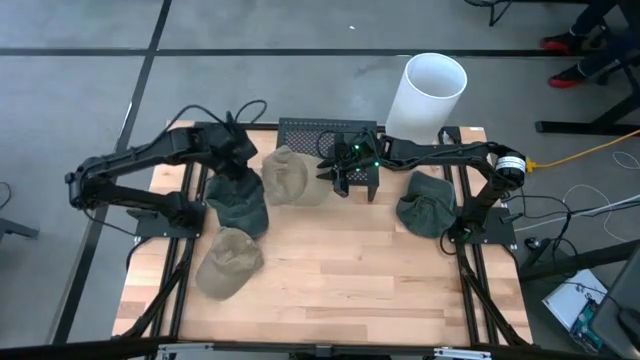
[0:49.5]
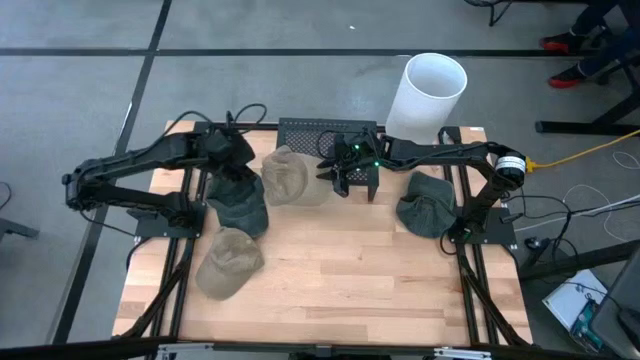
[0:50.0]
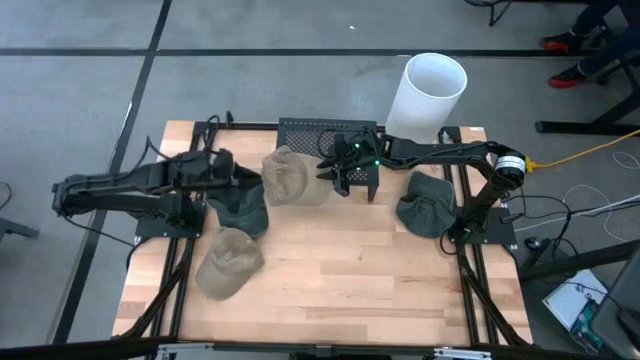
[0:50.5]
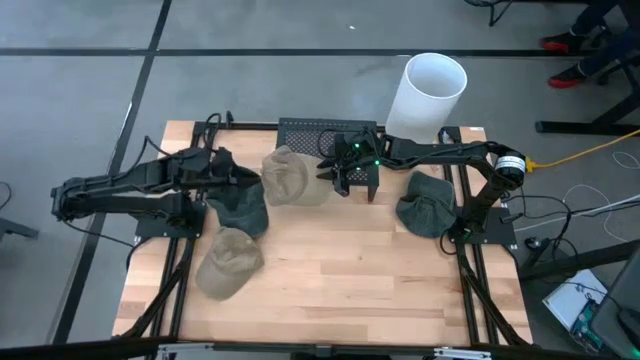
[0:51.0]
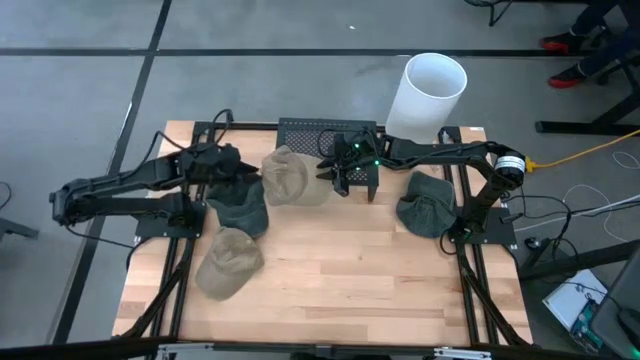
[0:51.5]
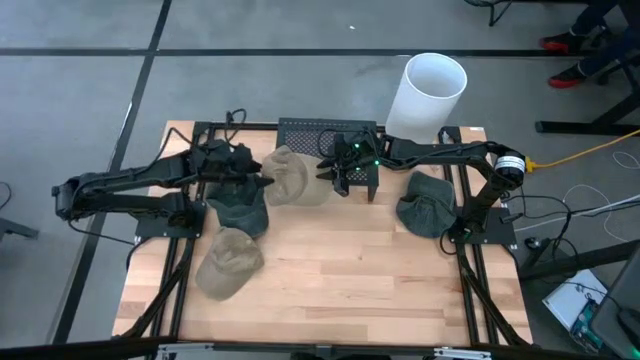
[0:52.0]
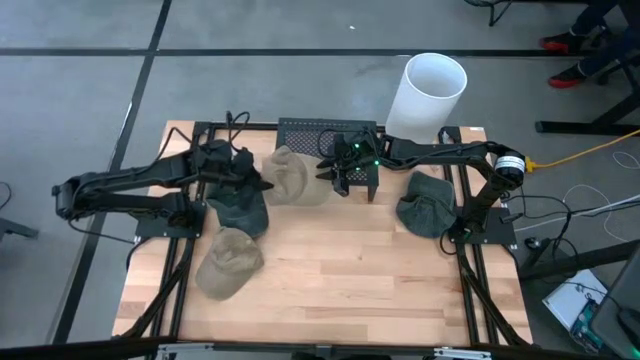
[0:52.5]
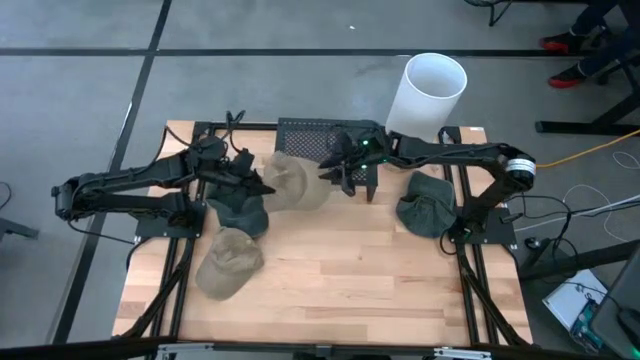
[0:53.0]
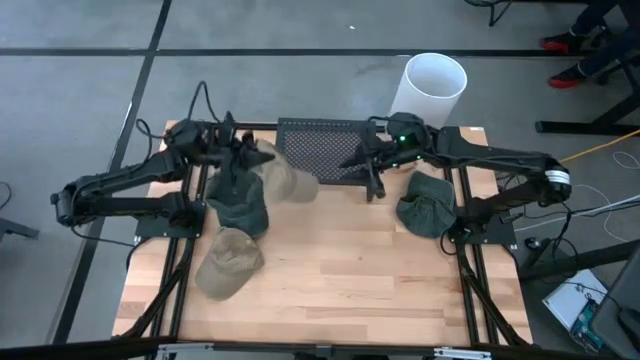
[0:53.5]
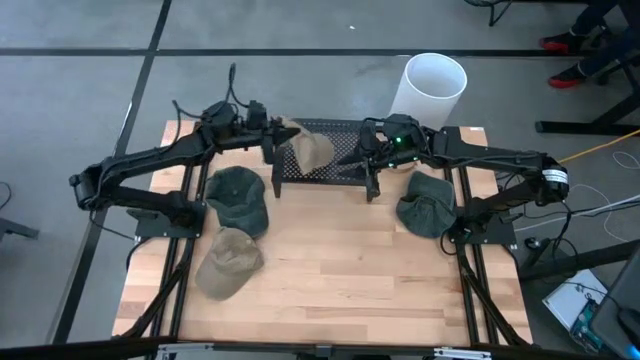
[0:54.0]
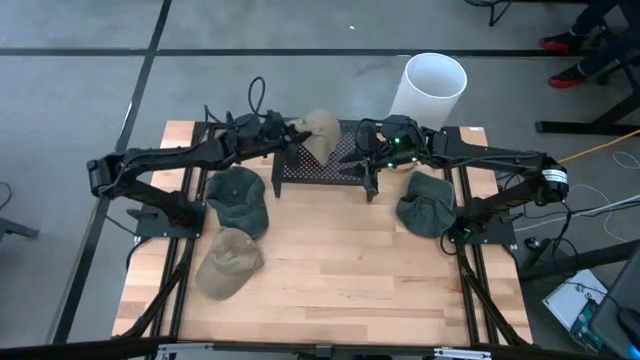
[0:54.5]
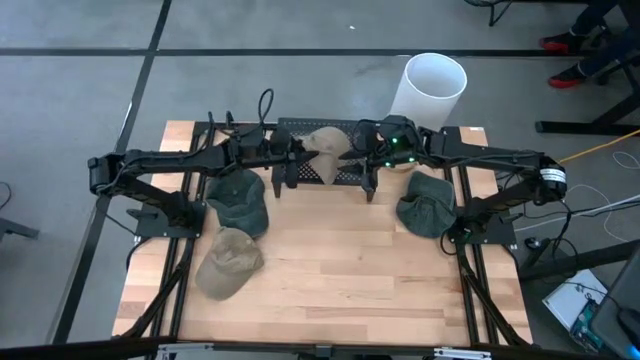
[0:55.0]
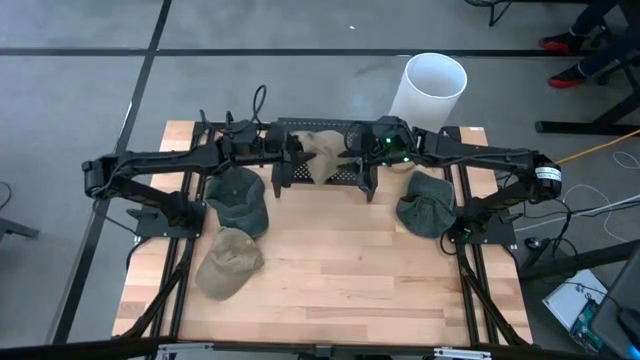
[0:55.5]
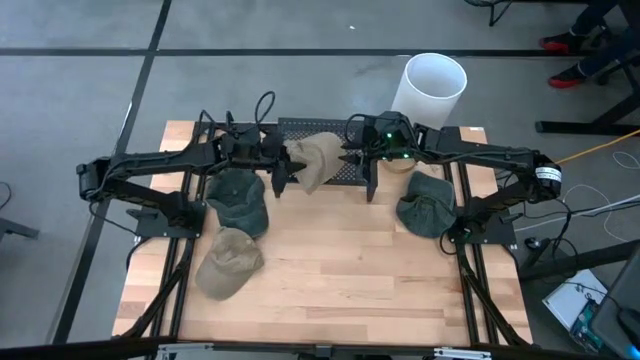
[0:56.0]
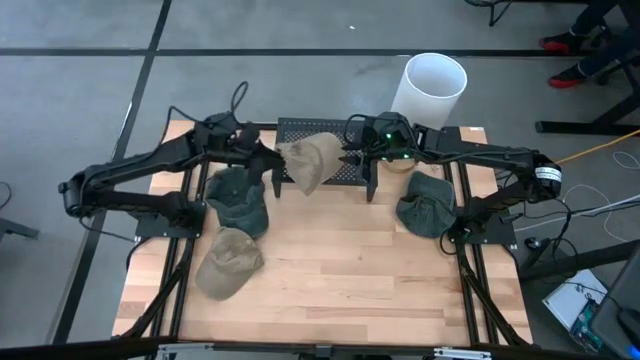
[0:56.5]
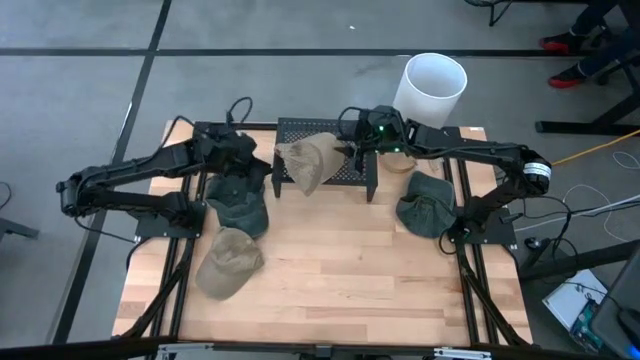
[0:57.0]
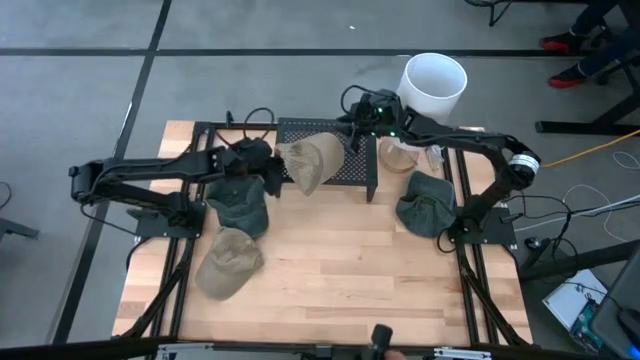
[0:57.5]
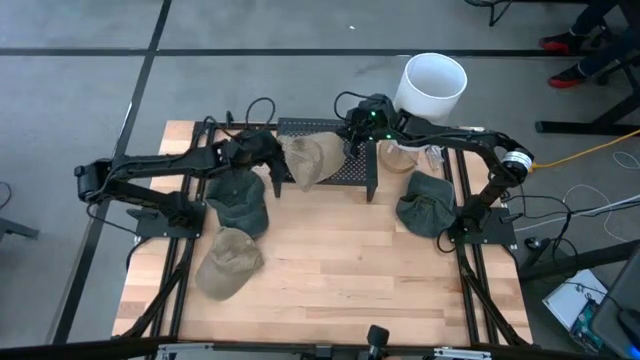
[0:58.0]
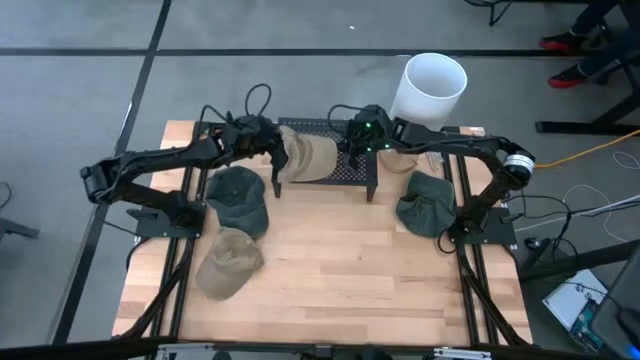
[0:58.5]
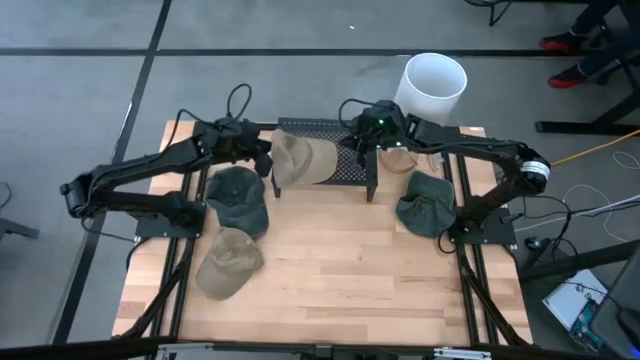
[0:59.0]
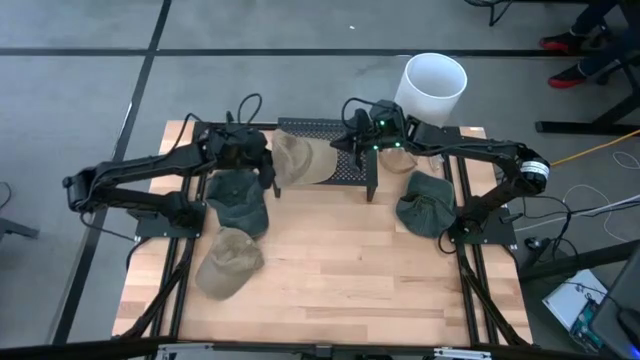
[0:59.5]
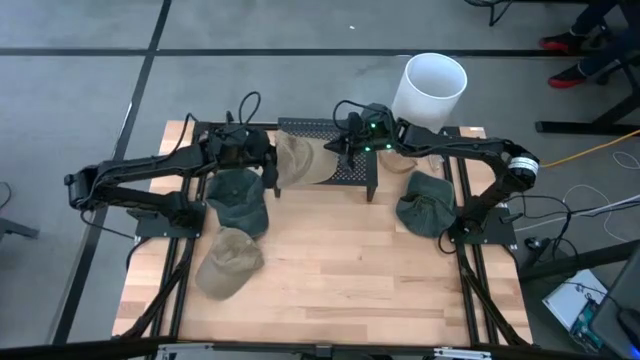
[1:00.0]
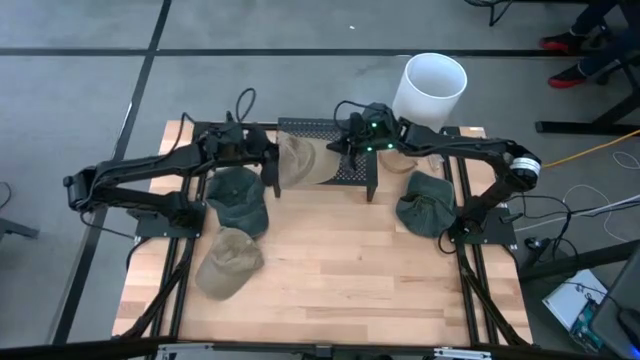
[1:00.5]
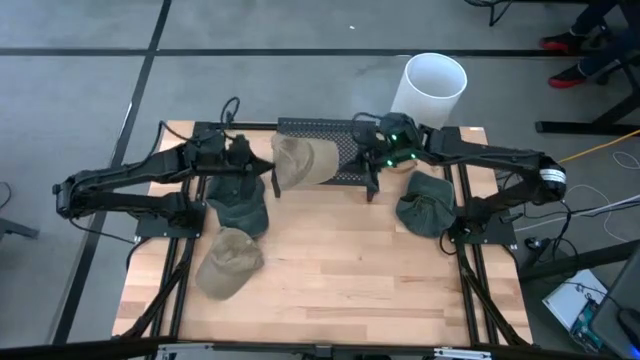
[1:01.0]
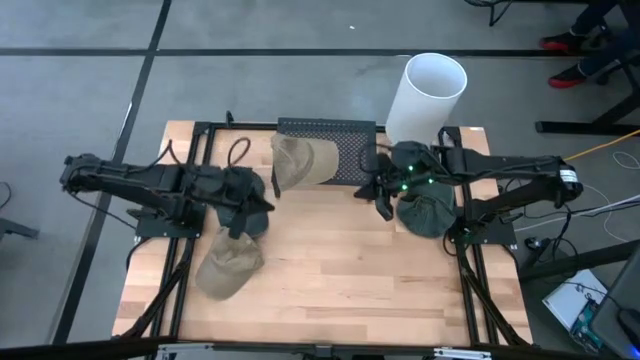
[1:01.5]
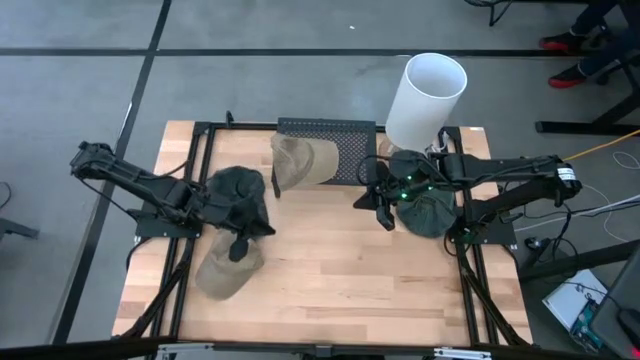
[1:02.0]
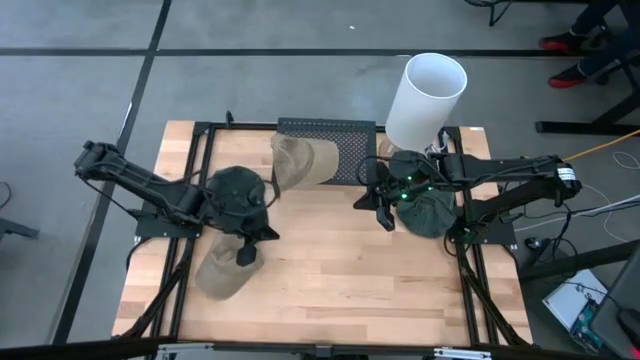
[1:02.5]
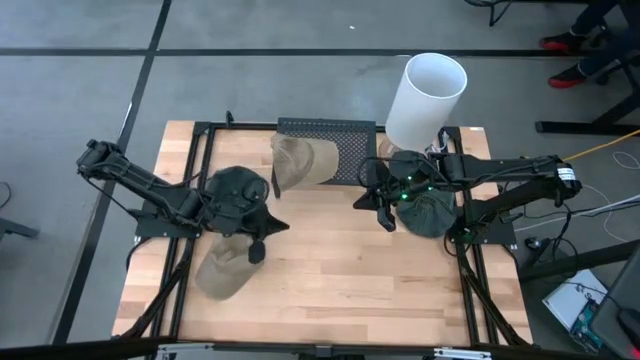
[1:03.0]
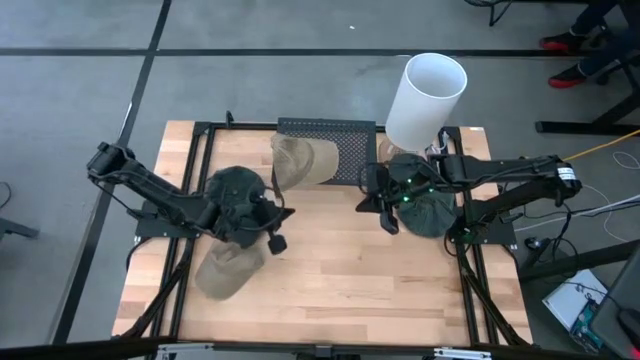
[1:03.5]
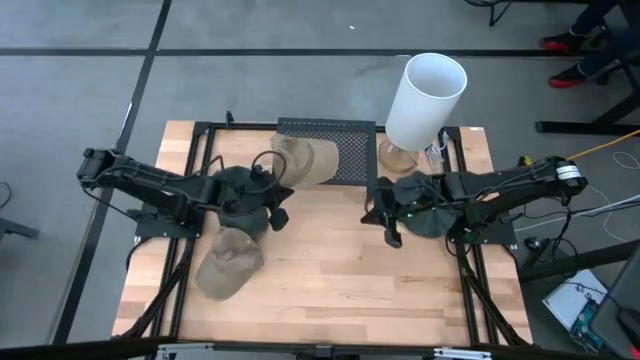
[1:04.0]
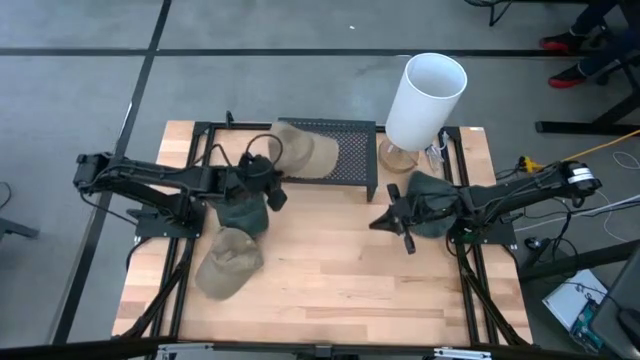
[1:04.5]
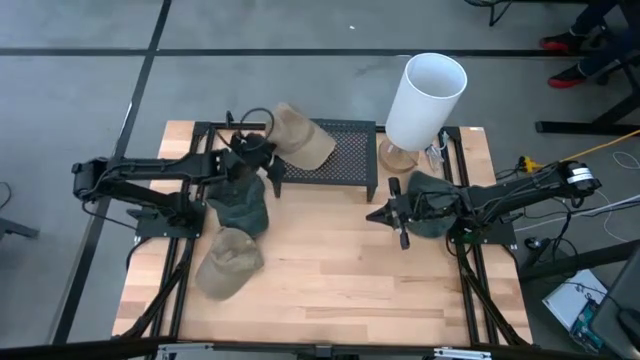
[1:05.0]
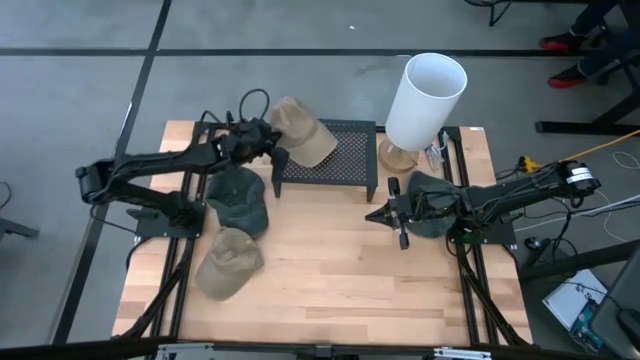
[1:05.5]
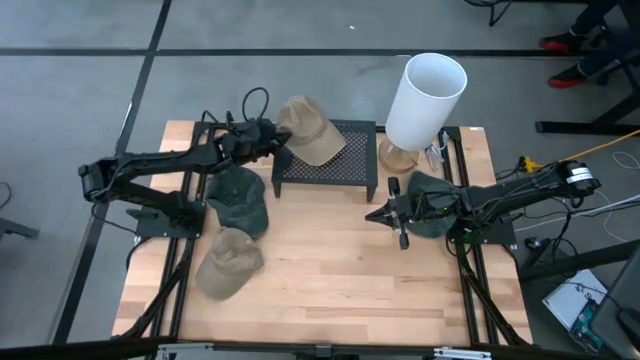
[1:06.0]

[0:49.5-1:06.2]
Task: Pick & Place hat
Put the right brown cap on the shelf

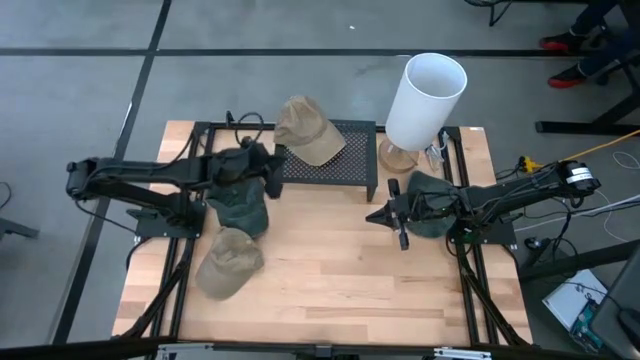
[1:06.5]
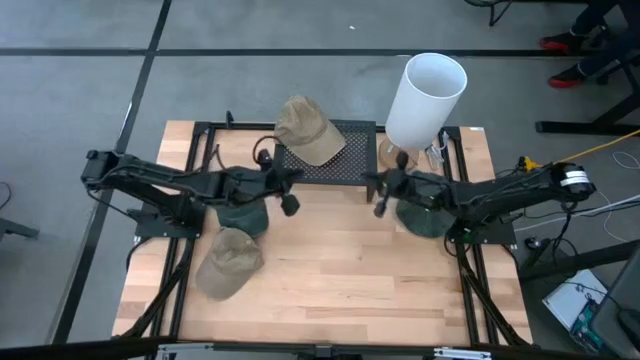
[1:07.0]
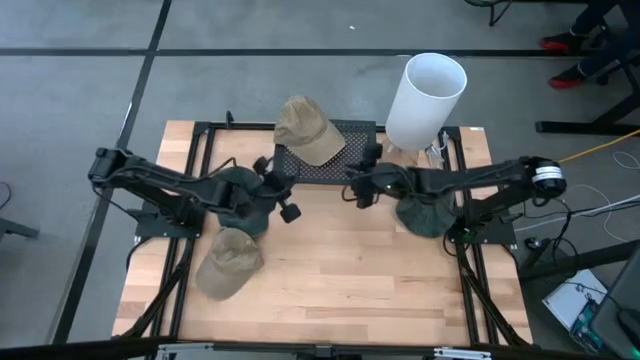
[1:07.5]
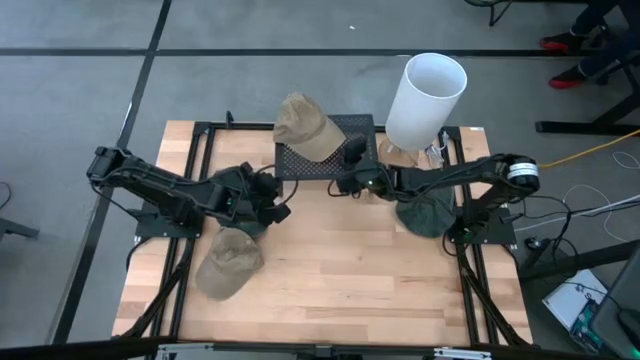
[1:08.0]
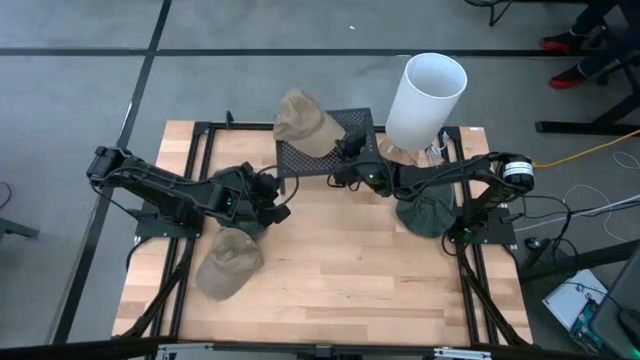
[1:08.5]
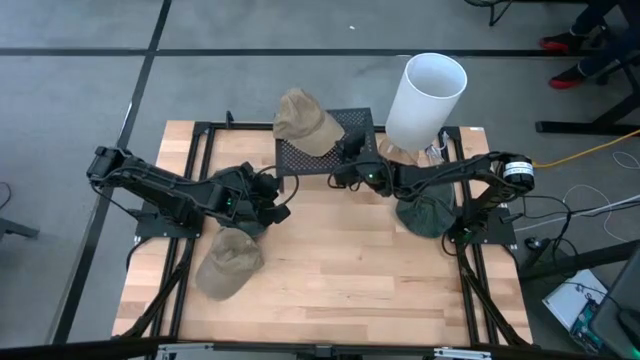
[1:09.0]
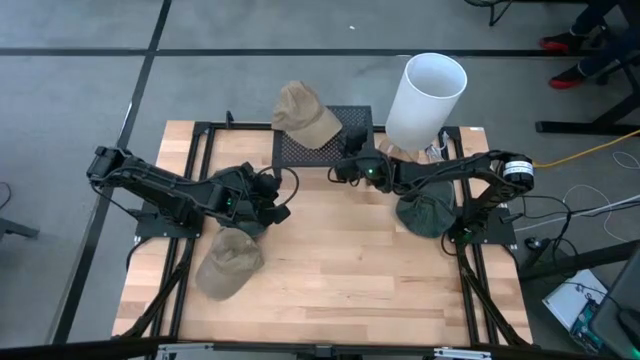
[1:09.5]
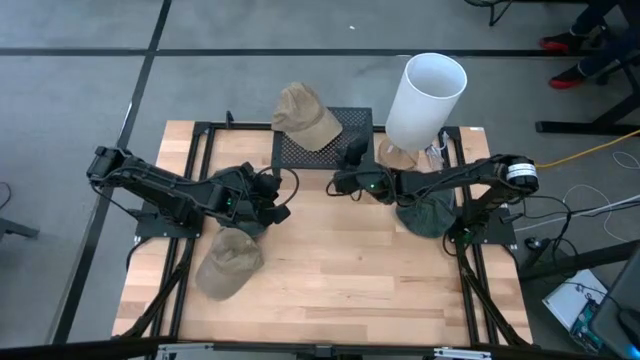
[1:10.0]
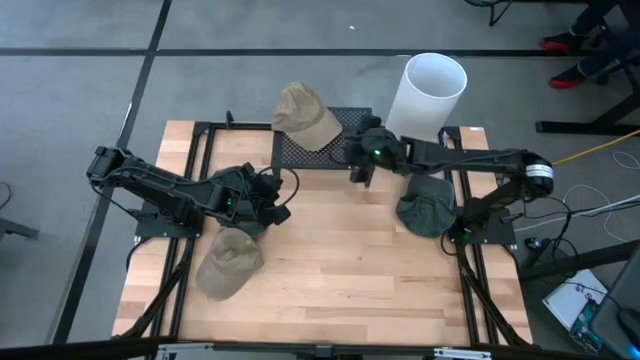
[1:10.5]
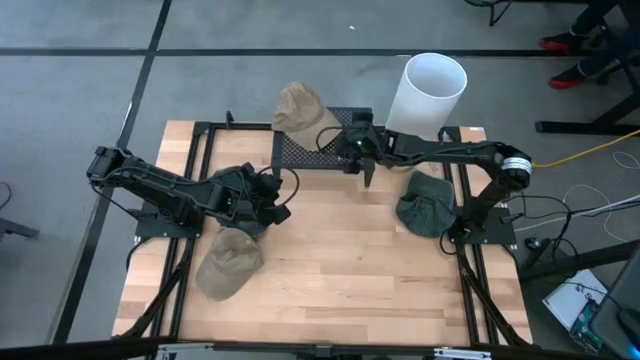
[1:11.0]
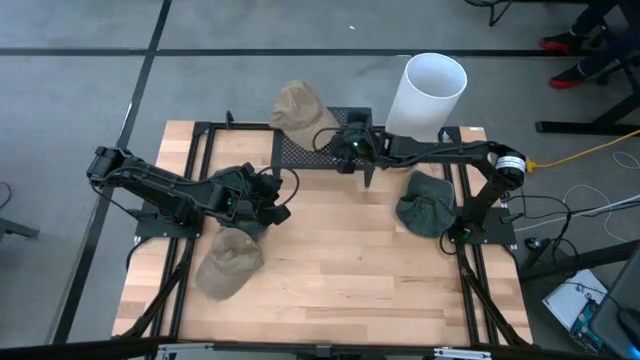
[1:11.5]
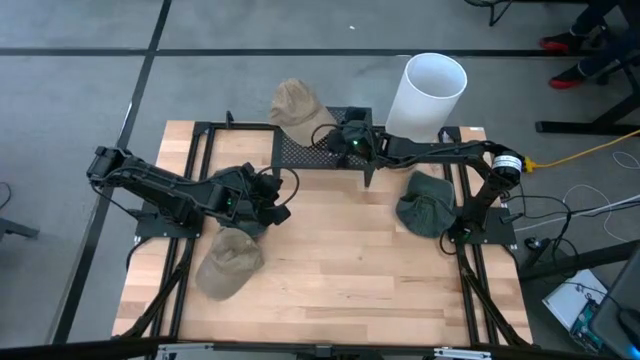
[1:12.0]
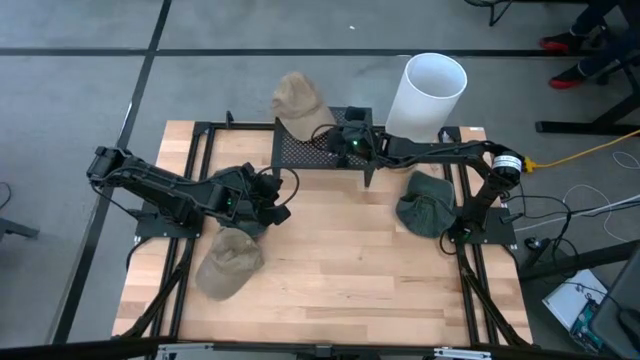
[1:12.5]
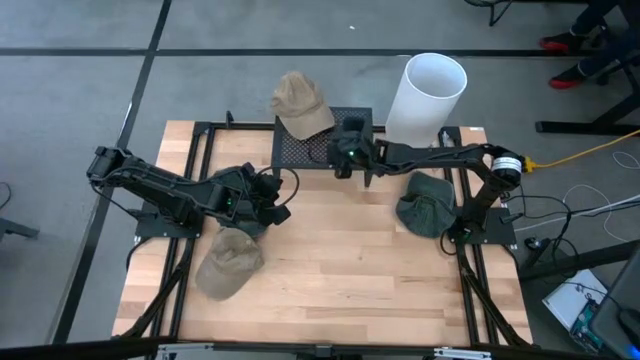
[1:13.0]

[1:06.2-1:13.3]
Put the right brown cap on the shelf
